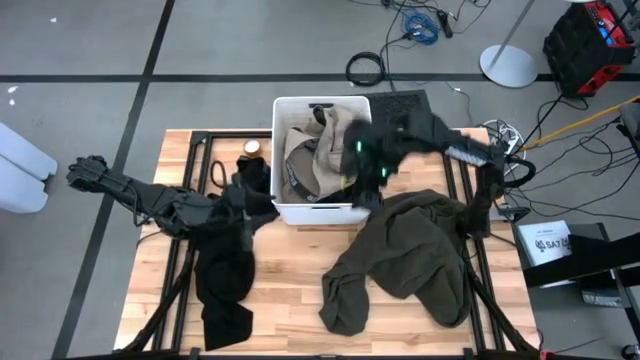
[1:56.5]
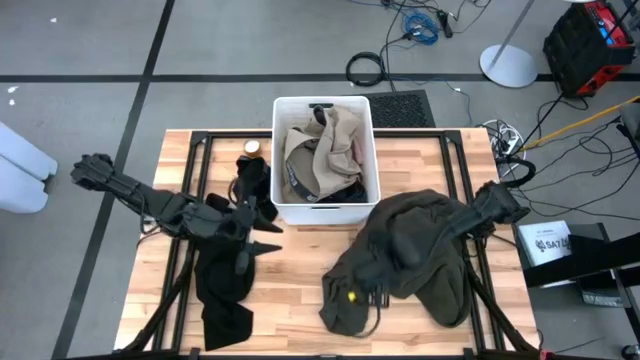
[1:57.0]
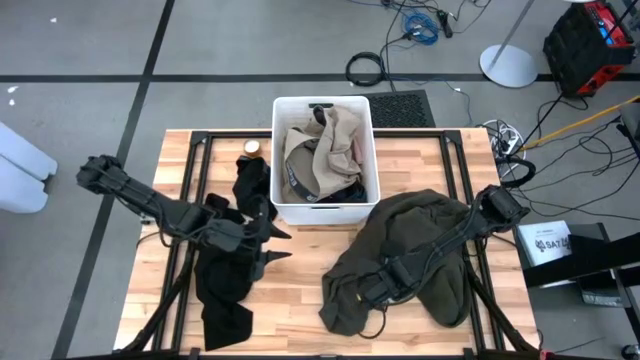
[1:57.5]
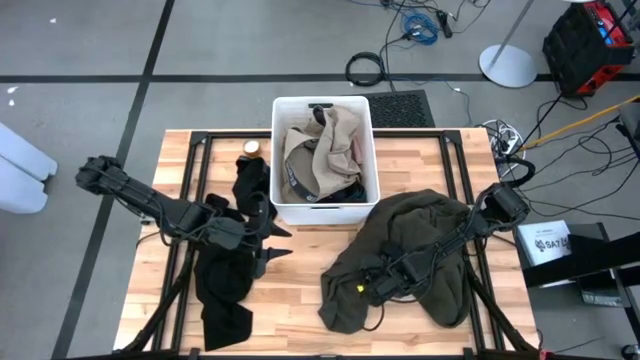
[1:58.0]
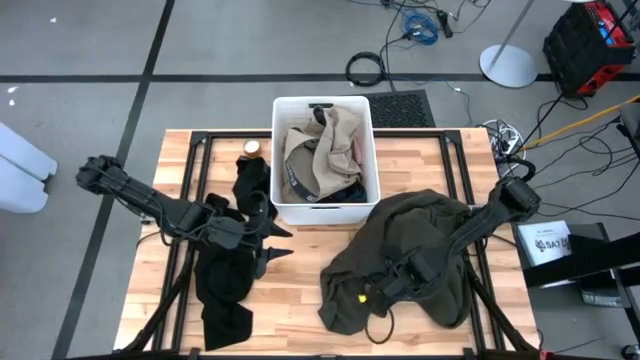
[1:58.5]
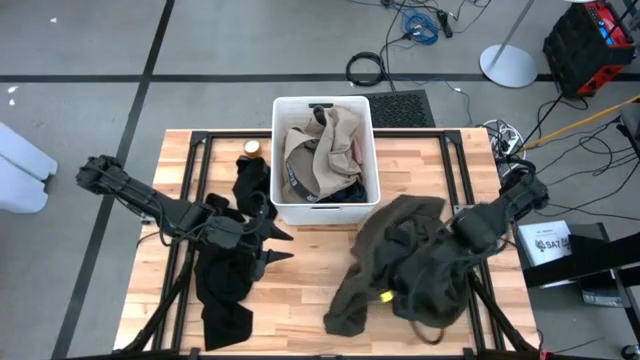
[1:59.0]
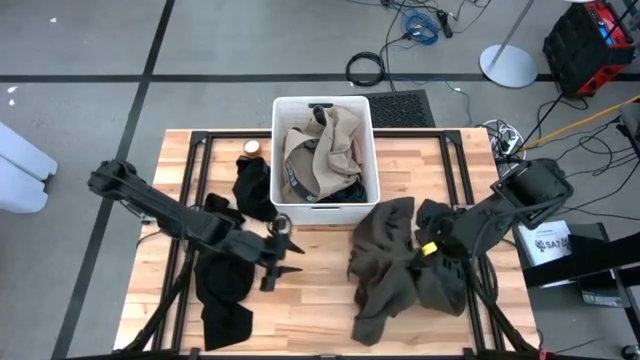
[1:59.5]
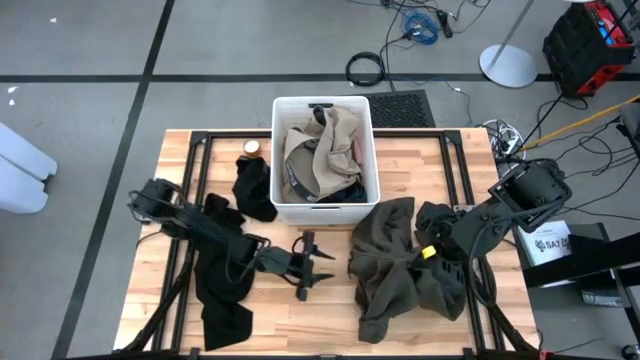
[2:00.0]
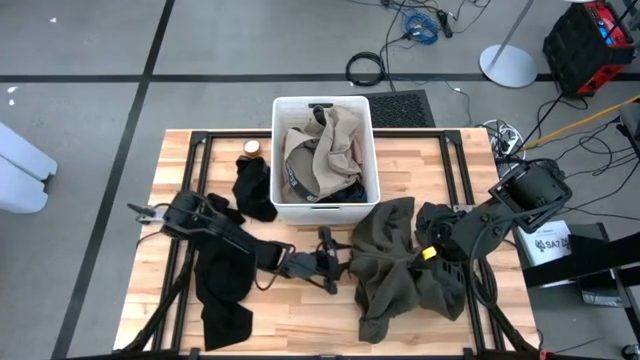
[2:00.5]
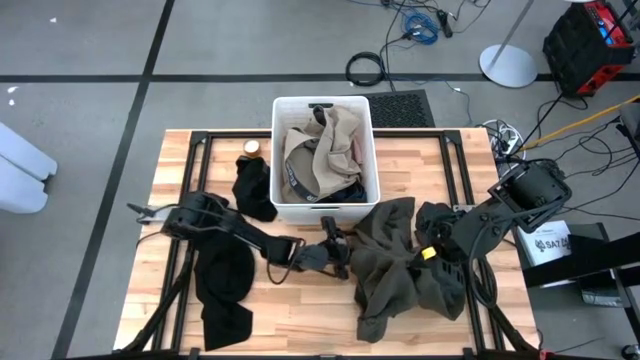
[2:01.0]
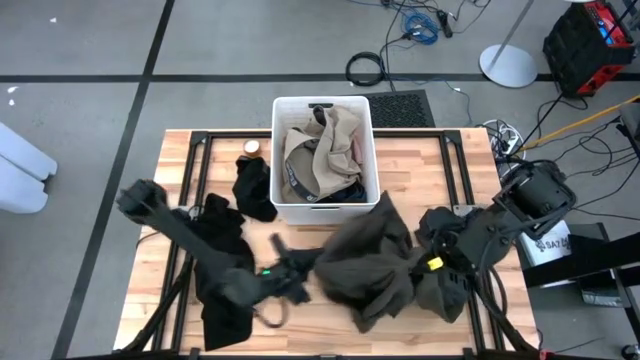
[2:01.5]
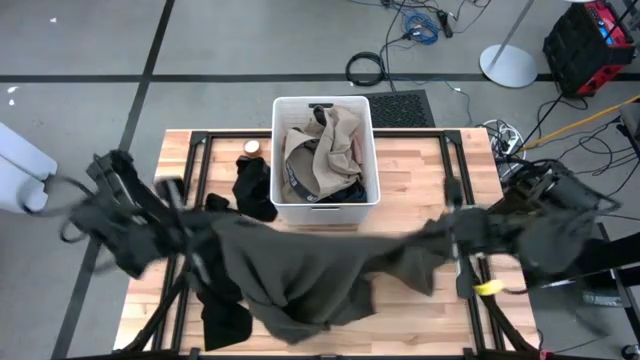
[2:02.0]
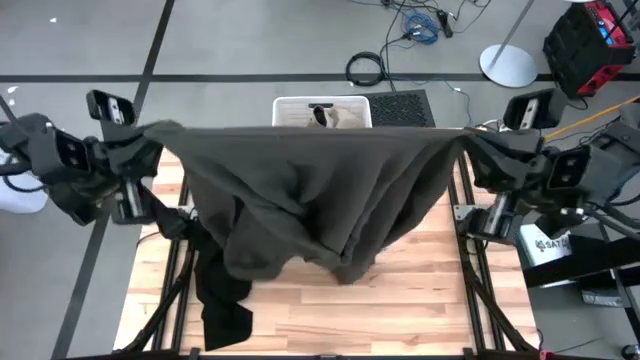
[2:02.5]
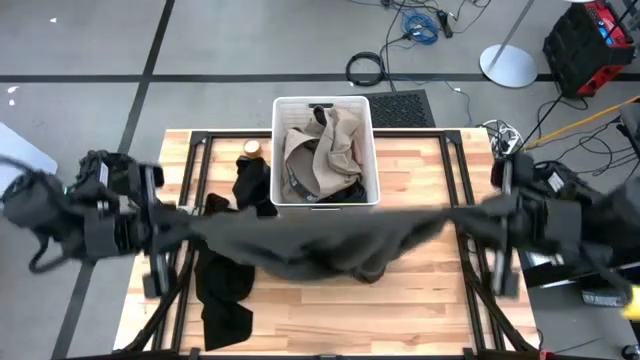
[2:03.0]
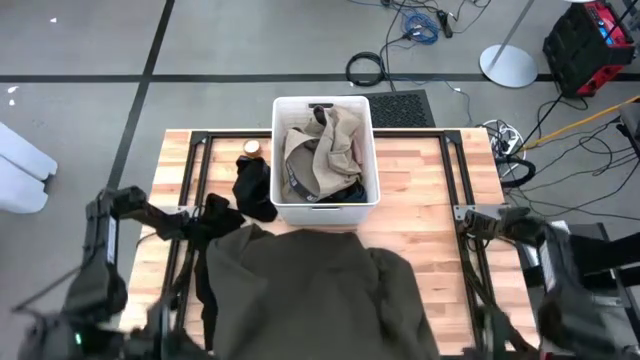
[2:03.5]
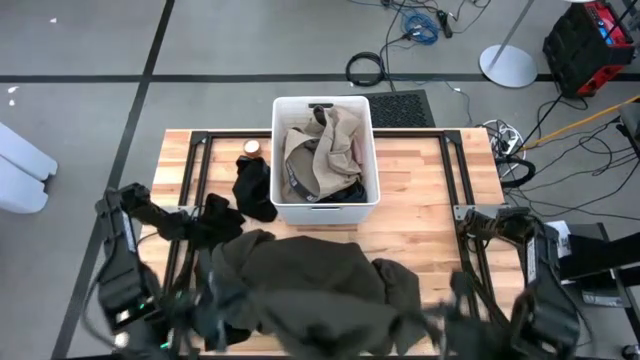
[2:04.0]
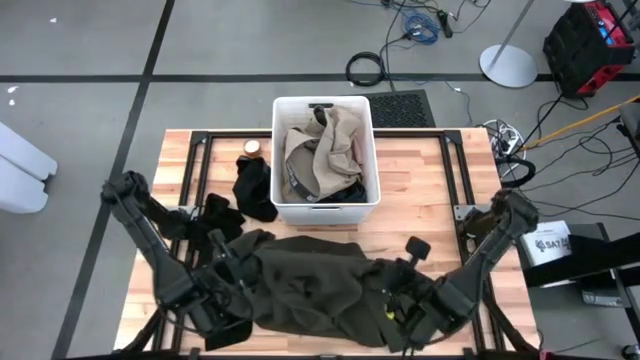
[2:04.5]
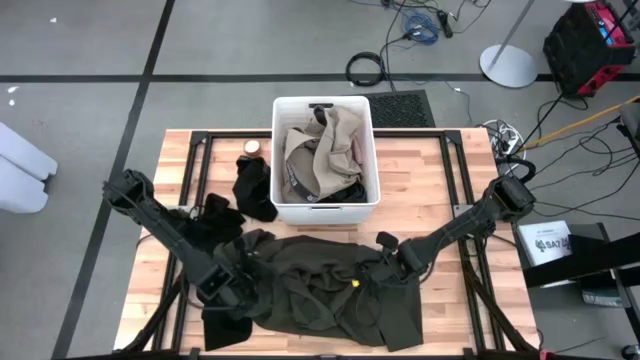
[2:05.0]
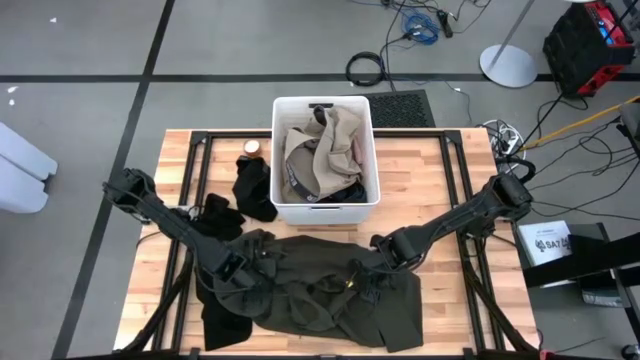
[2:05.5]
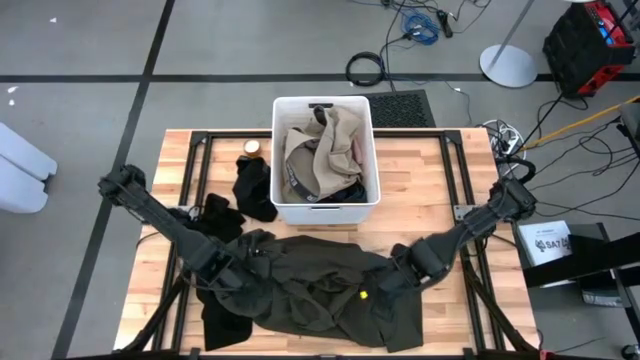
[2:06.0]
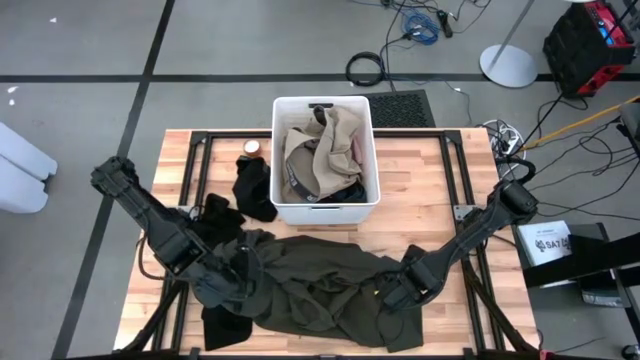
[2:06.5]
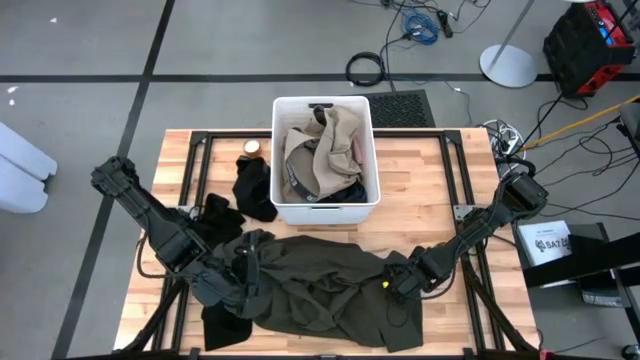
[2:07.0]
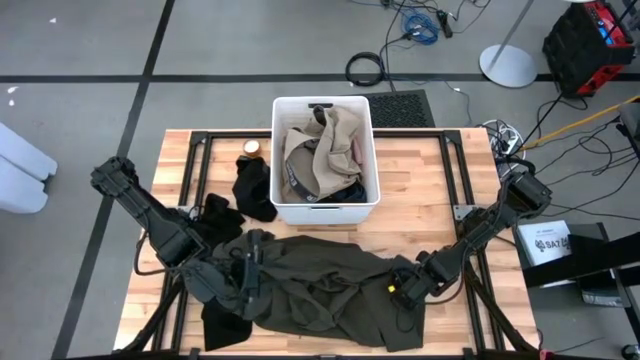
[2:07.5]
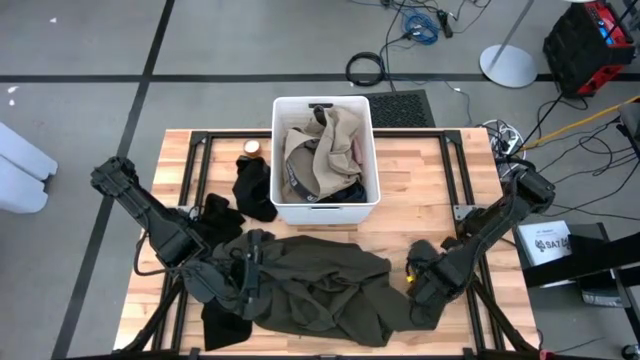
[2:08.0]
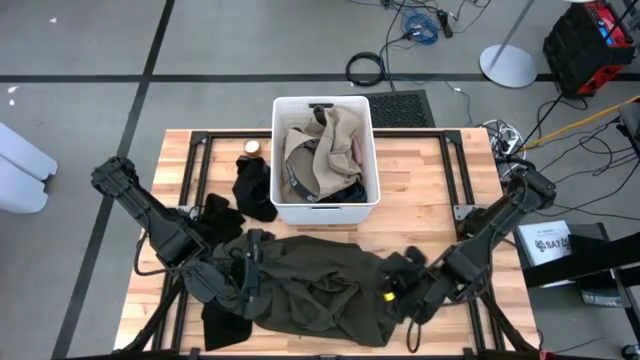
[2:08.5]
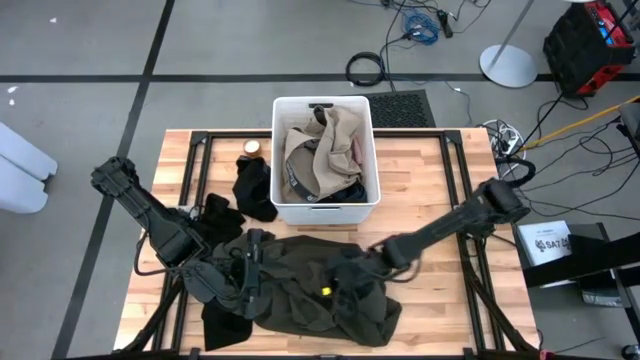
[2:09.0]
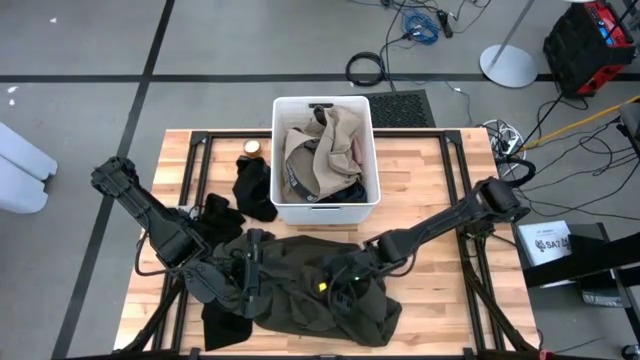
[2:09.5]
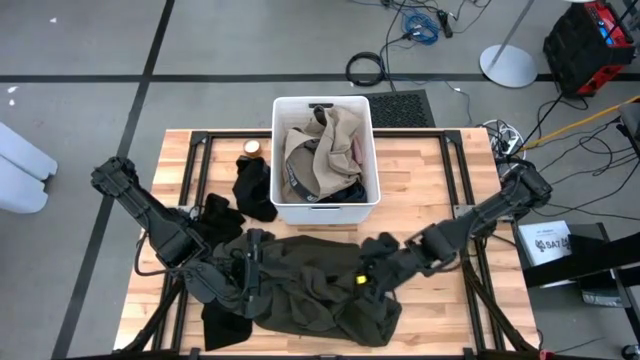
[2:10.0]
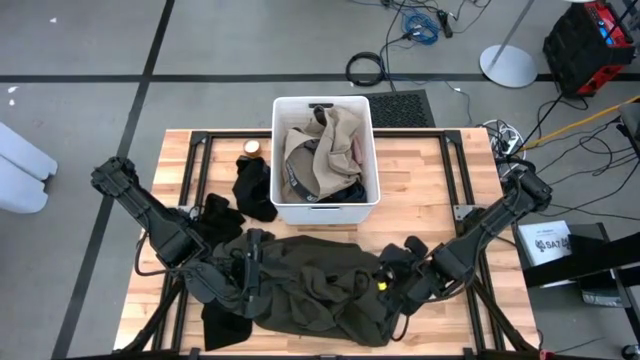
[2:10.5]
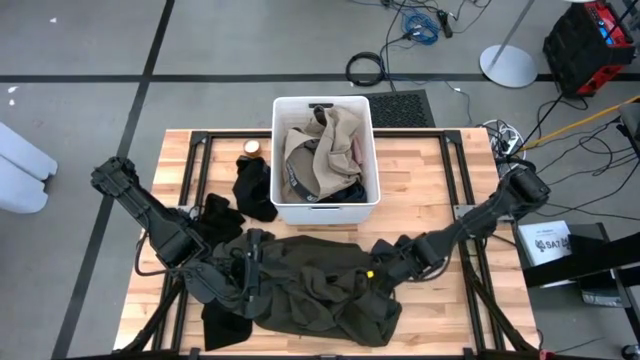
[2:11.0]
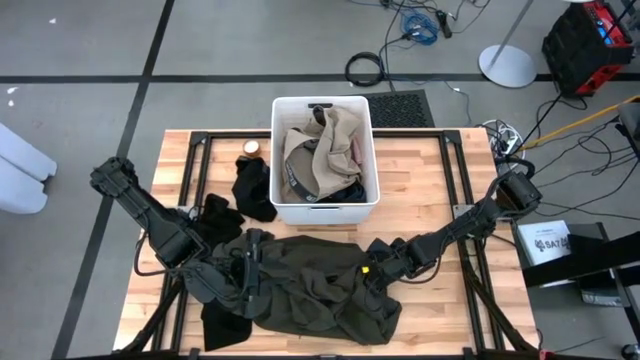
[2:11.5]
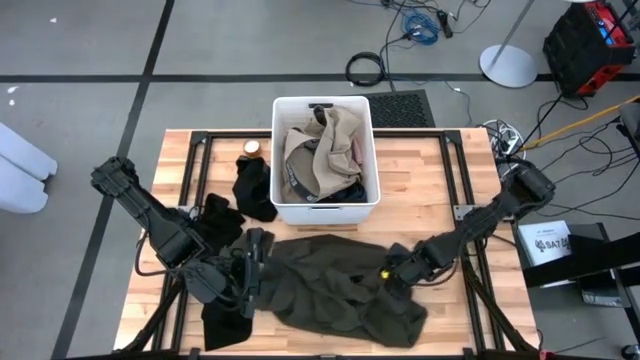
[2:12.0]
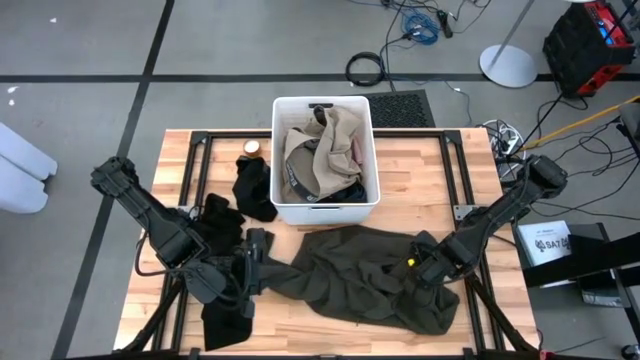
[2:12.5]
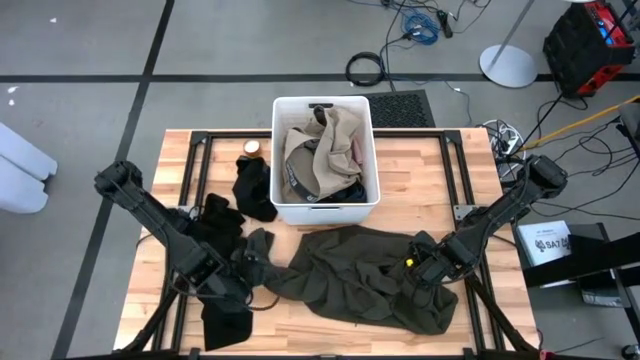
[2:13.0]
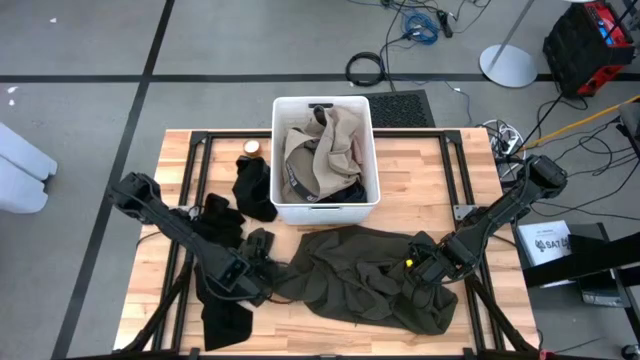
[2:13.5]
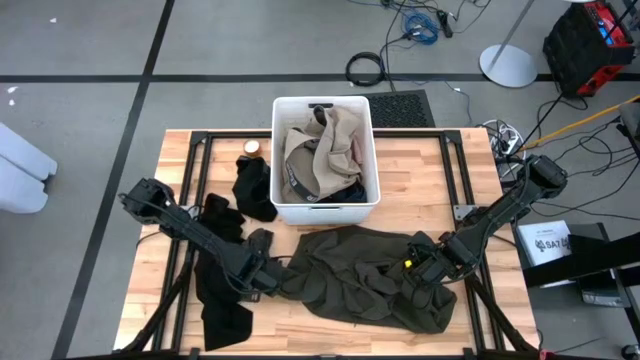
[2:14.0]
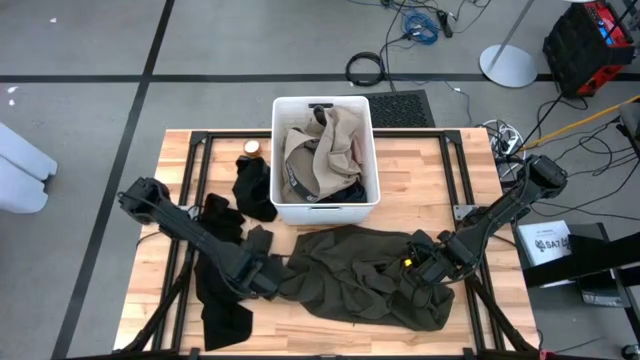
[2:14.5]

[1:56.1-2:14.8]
Task: Fold laundry
Fold the black jacket into the white laundry bin

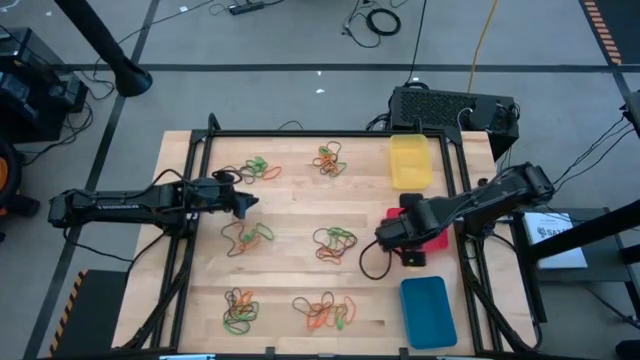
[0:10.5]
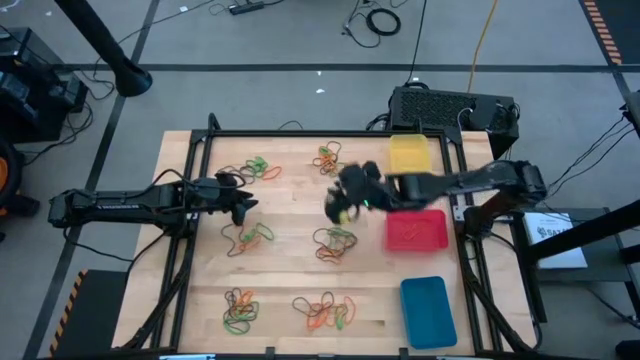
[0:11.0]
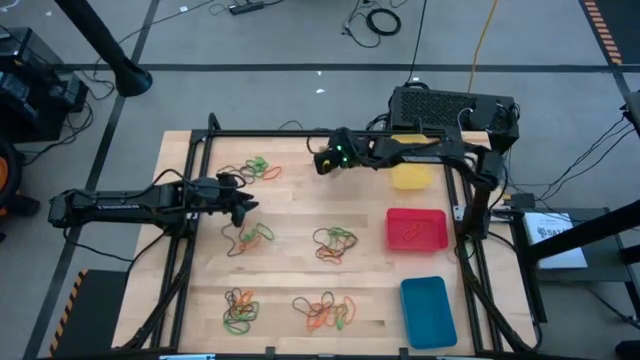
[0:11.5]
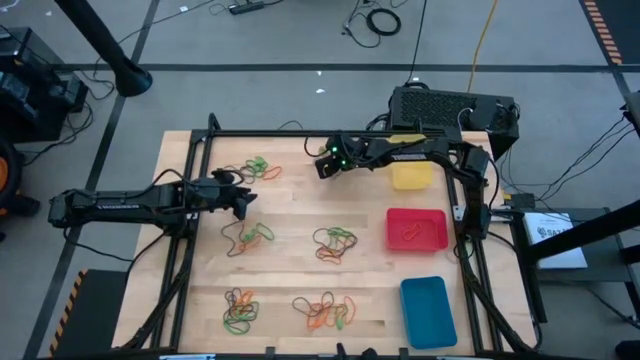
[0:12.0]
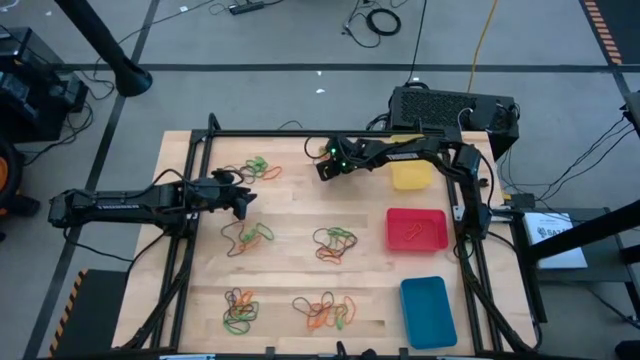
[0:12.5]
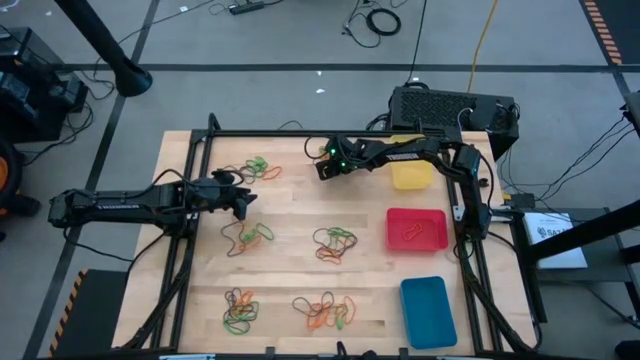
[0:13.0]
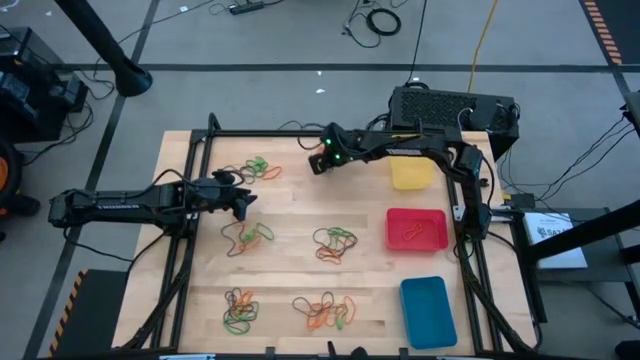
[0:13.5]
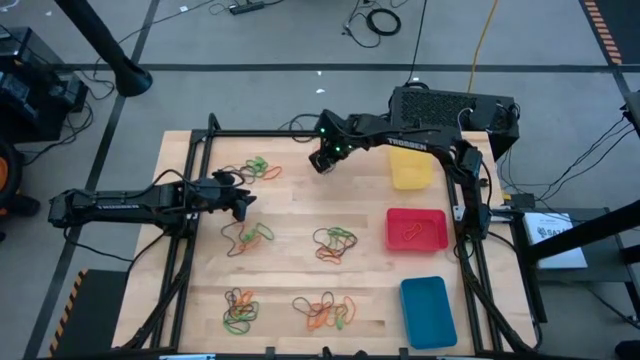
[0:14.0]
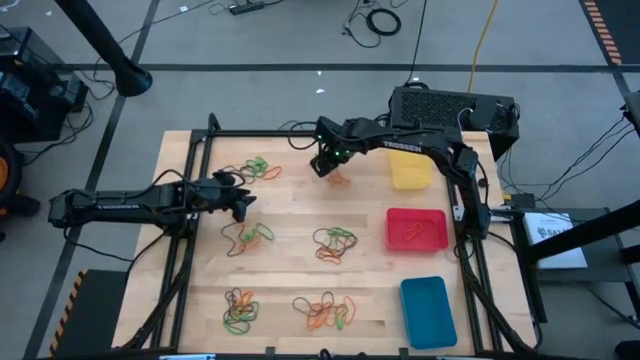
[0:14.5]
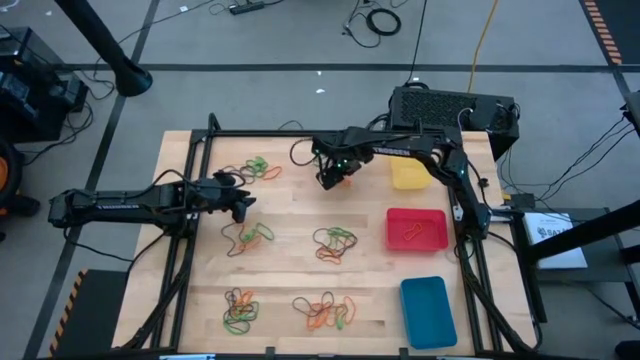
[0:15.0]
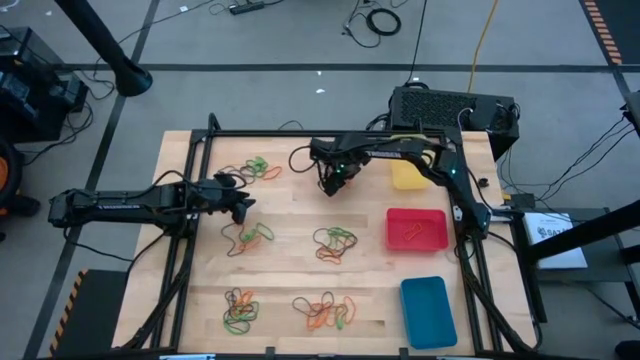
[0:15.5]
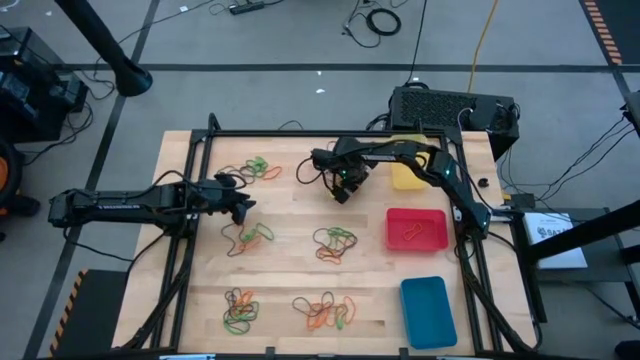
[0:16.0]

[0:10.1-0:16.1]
Task: Sort rubber bands into baskets
Put the orange rubber band into the red bin
